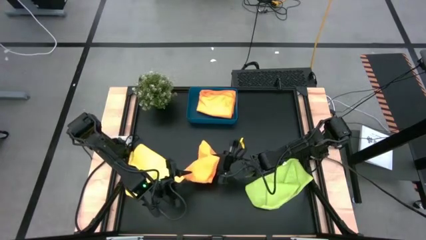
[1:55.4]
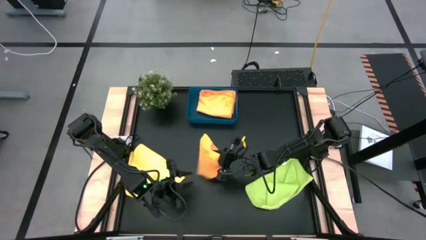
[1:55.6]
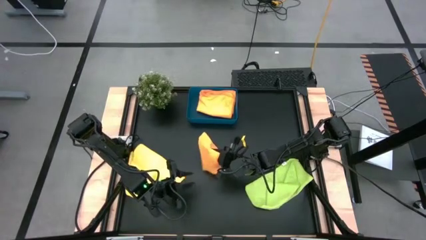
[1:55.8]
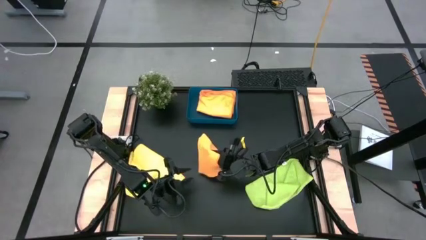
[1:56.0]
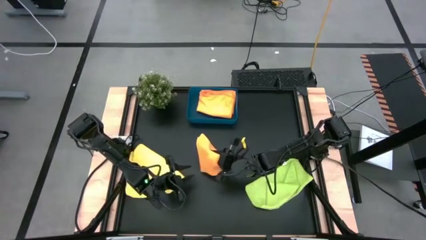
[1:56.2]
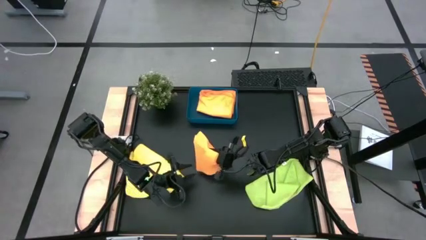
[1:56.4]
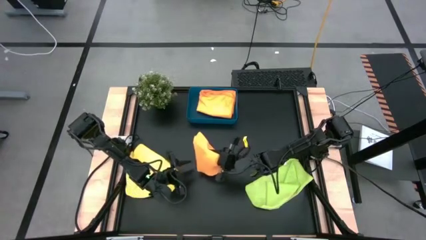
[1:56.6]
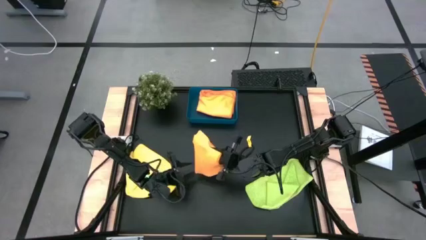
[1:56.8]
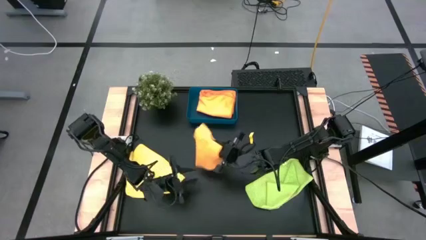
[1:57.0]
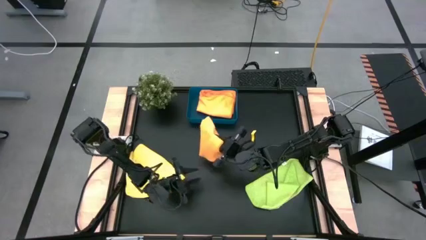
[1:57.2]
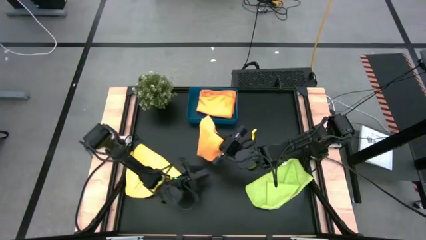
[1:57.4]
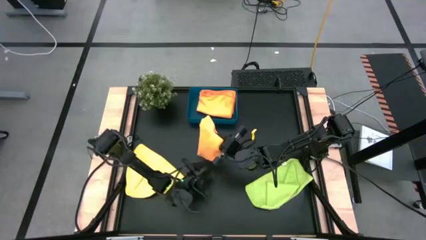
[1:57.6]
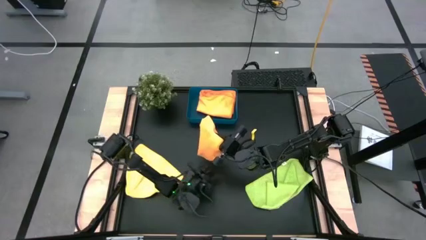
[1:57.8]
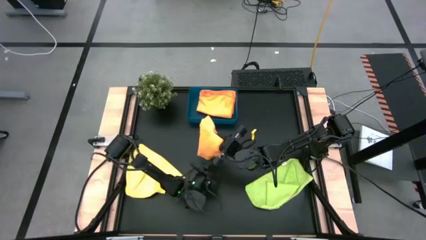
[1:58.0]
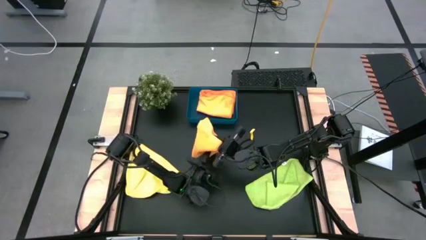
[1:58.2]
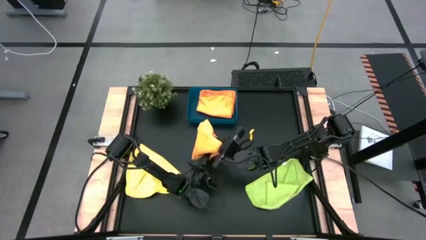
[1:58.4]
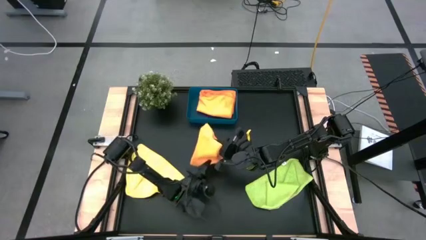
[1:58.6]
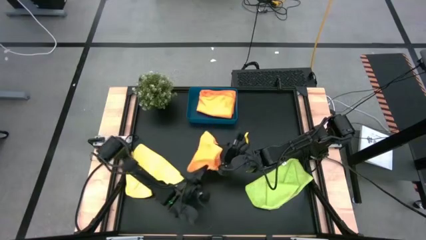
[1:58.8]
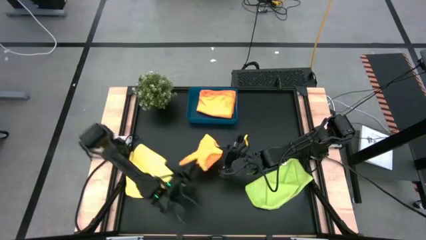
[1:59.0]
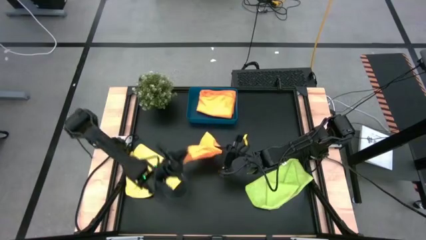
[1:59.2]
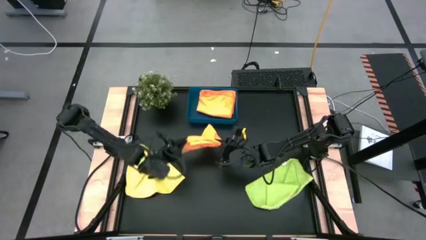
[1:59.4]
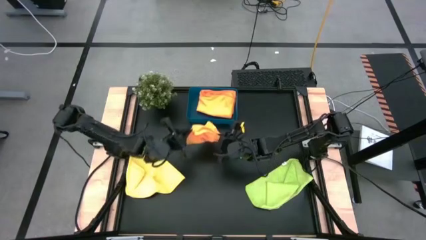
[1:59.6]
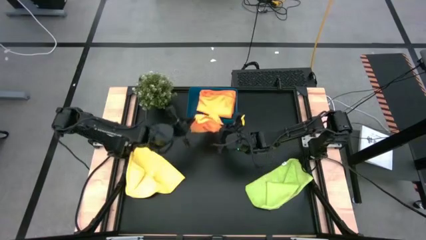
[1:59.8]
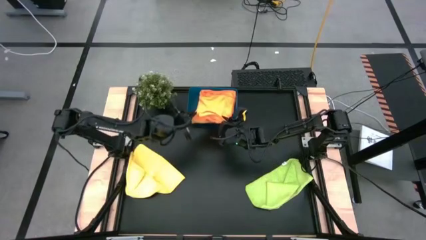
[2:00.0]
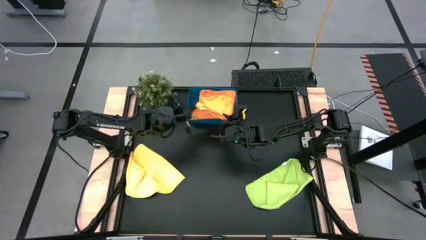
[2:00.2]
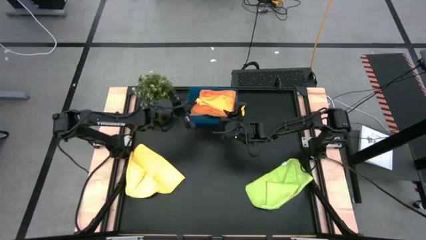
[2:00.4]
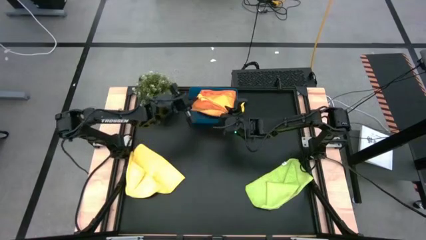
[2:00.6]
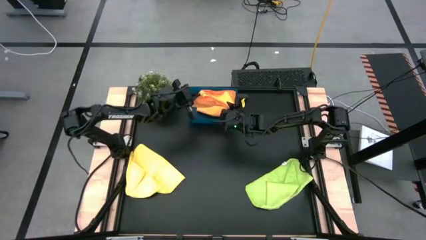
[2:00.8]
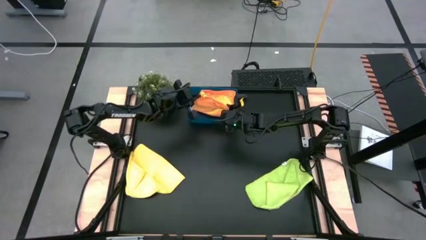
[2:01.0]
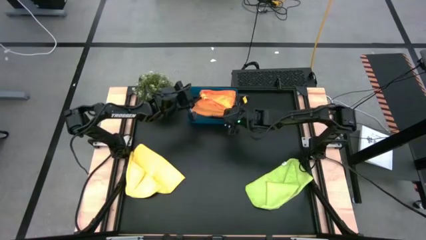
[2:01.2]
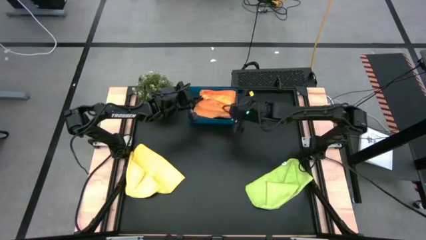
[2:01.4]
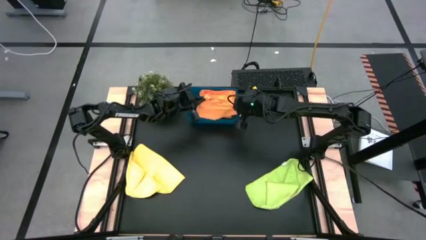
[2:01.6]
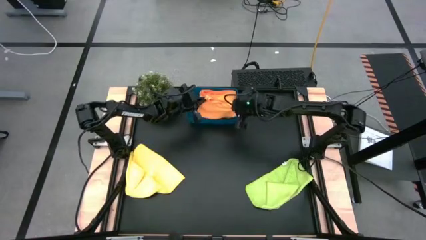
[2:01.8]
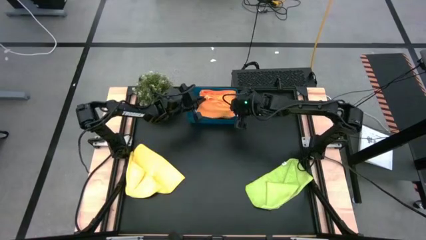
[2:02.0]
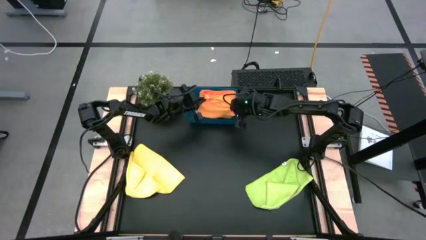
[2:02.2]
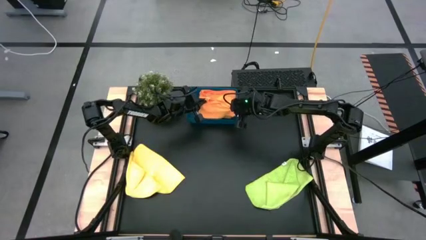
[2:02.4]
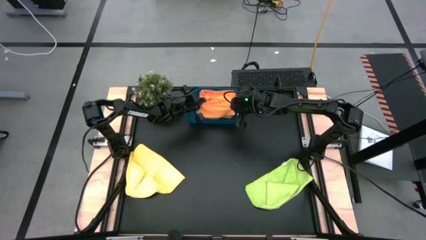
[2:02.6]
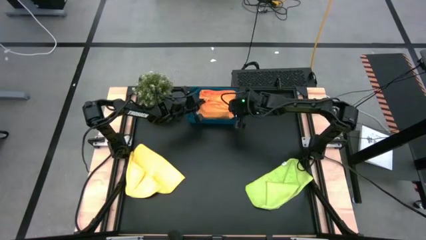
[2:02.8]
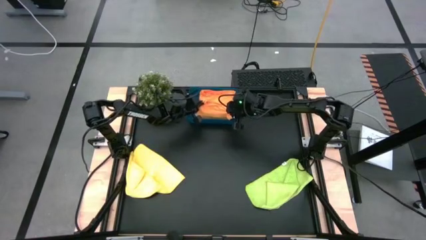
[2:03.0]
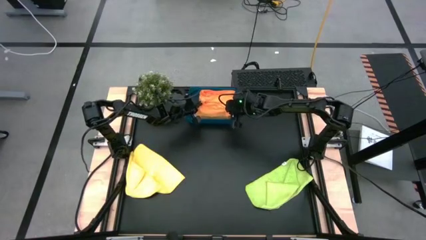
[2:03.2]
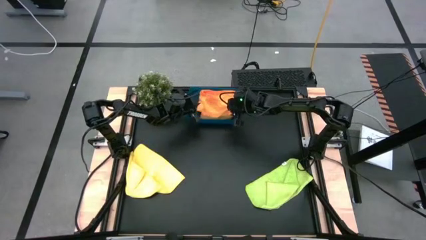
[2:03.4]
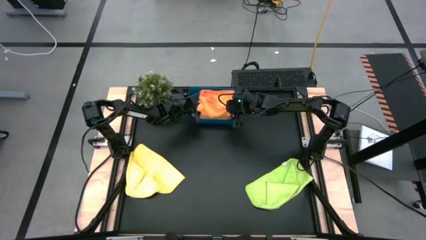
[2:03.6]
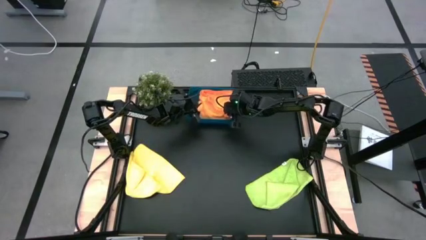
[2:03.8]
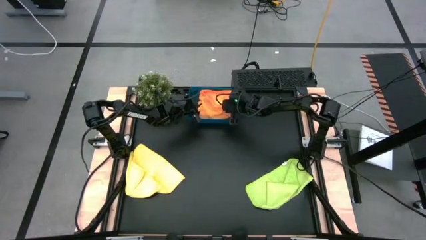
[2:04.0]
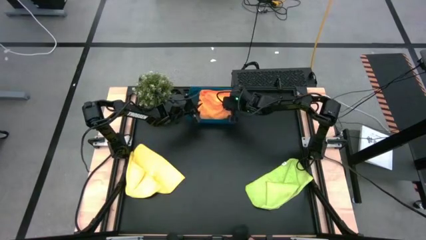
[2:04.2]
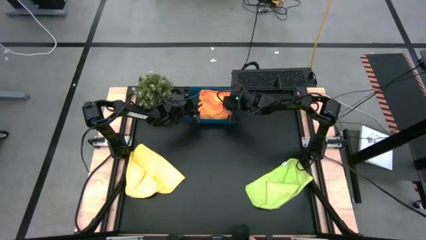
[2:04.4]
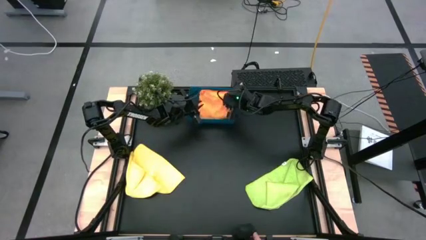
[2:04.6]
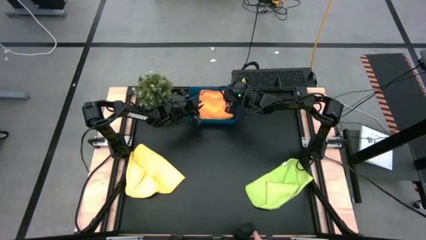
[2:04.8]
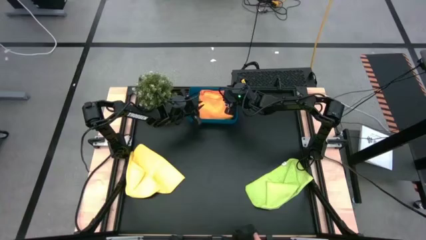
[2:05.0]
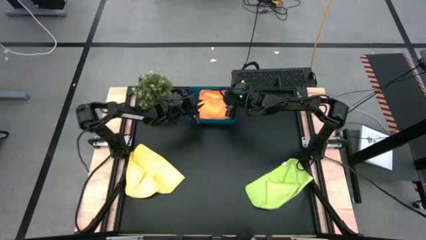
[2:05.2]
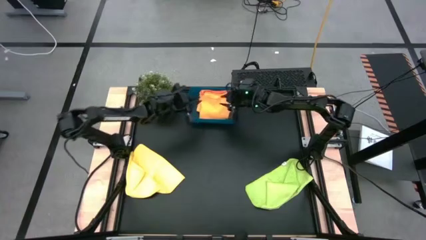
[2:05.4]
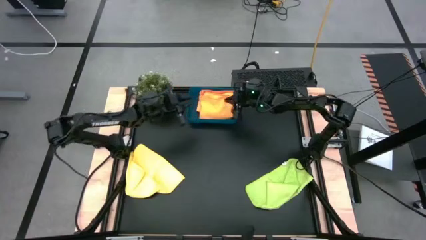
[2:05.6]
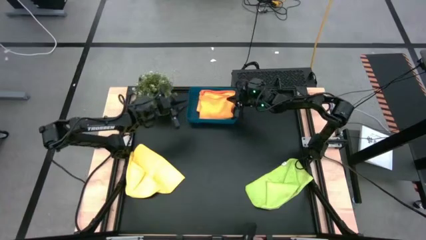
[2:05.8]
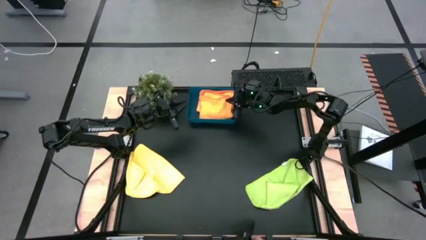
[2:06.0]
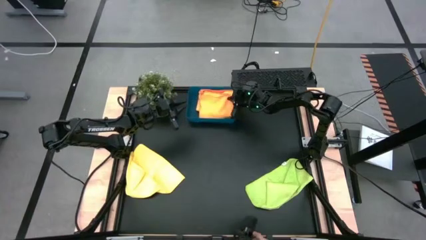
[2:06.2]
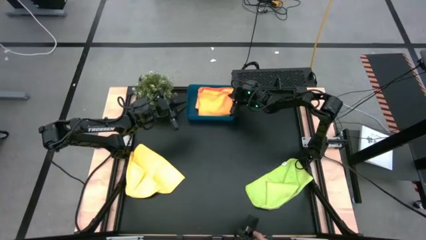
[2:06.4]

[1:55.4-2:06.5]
Task: Fold microfiber towels
Put the orange microfiber towel into the blue bin

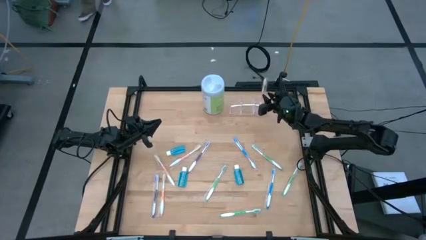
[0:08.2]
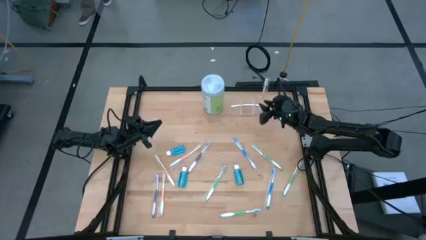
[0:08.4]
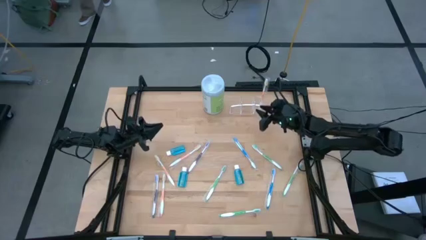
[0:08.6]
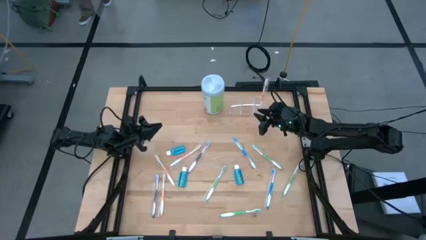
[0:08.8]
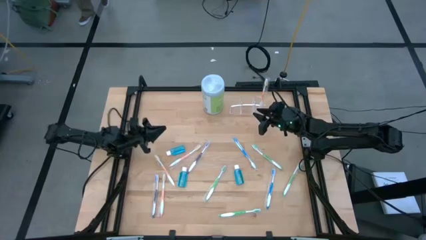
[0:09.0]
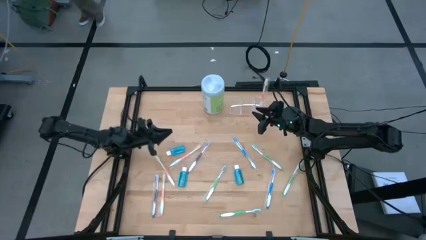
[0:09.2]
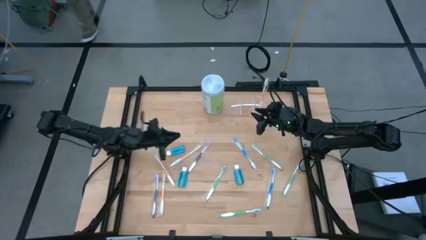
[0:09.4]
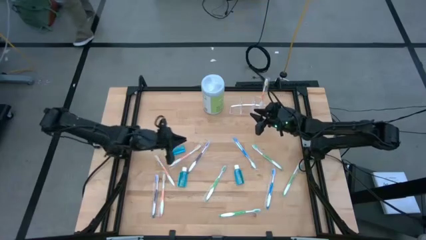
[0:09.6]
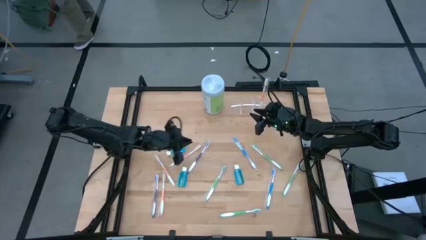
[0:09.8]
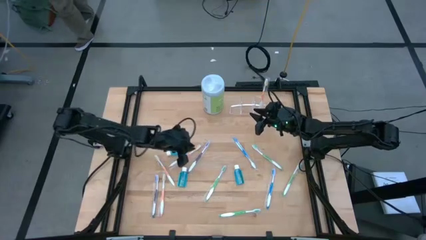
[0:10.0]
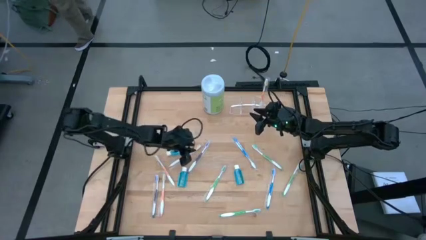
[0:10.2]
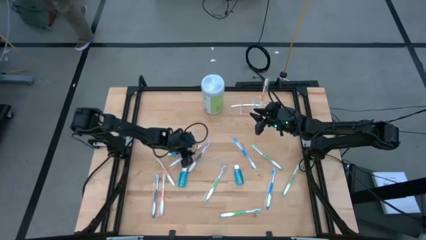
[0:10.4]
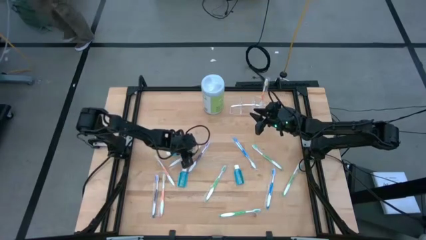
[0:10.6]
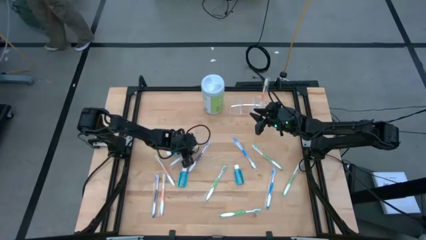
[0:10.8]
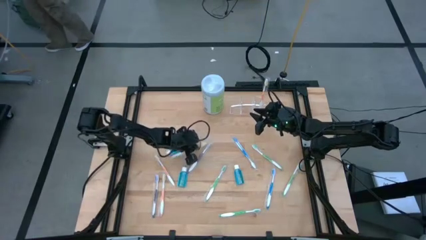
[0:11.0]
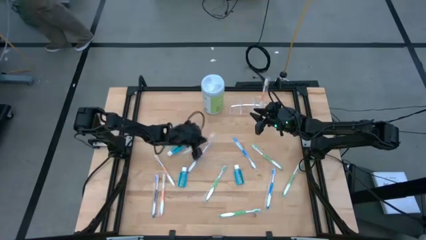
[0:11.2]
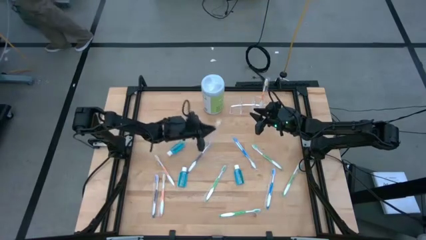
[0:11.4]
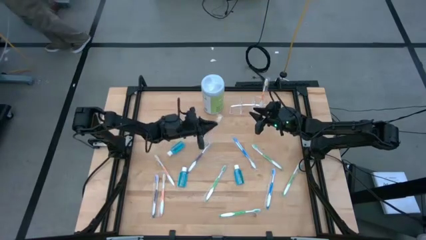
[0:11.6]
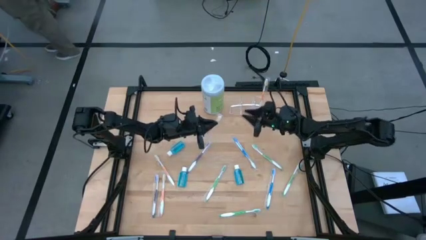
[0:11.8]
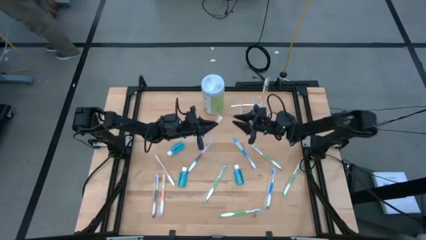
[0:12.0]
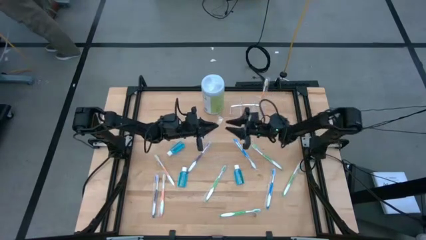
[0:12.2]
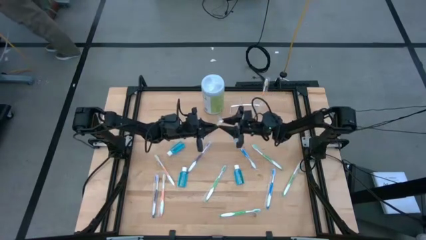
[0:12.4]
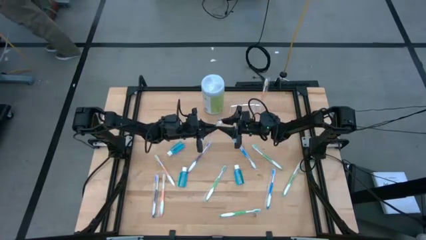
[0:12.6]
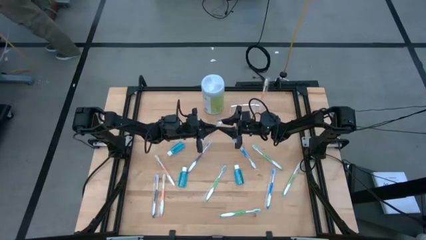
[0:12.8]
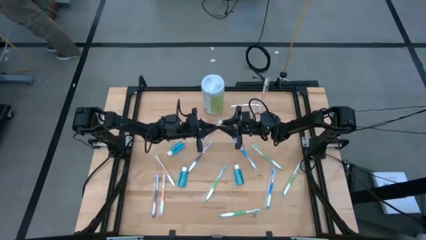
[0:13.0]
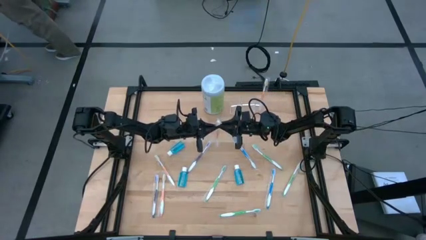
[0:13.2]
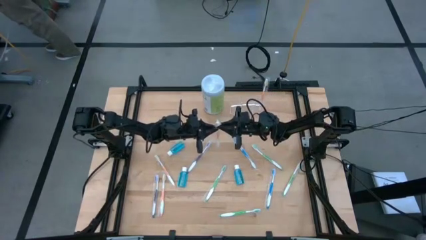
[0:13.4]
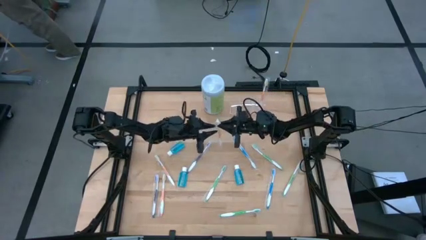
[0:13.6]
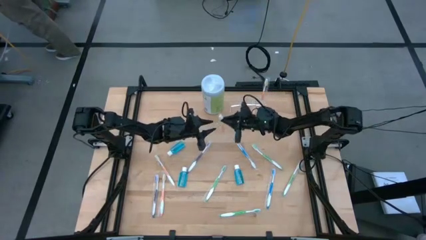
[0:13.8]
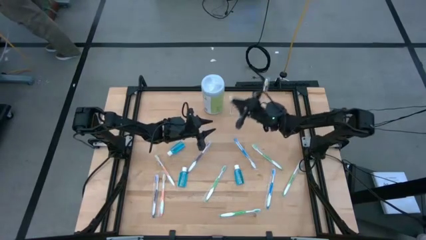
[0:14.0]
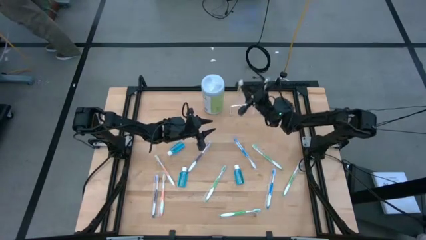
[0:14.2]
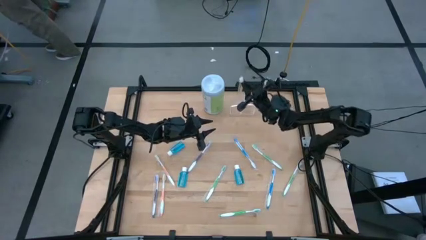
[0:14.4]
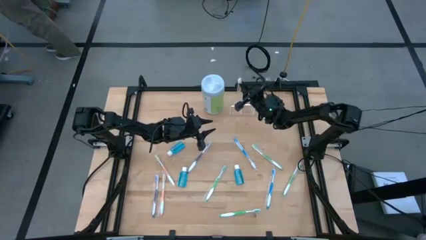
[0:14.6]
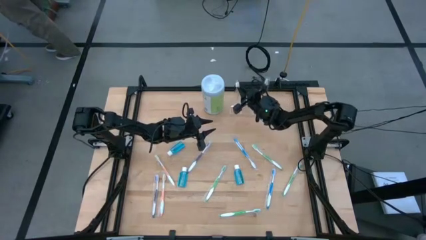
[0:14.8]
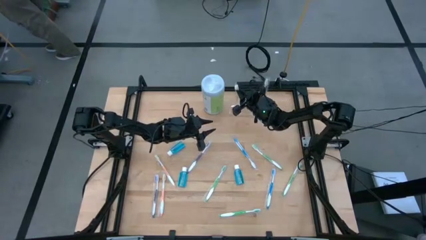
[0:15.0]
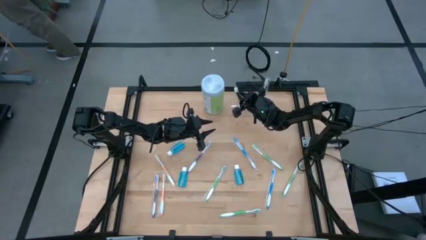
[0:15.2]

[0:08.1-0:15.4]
Task: Pick & Place toothbrushing station
Put the orange toothbrush into the transparent organizer
